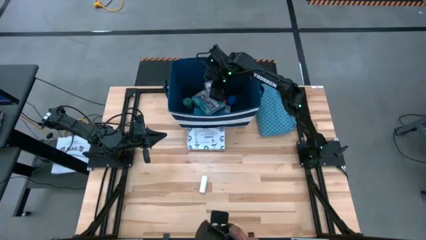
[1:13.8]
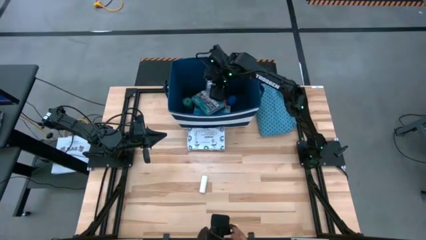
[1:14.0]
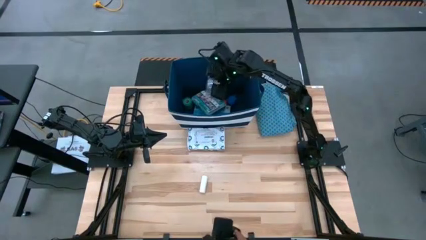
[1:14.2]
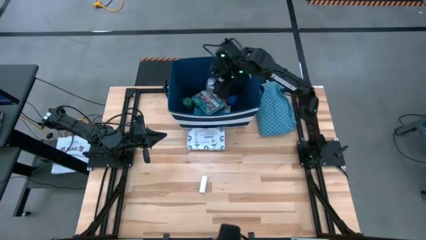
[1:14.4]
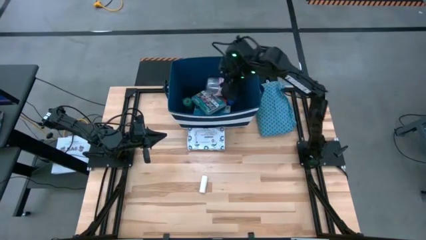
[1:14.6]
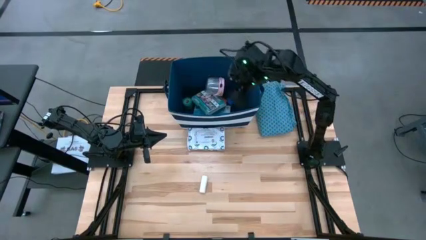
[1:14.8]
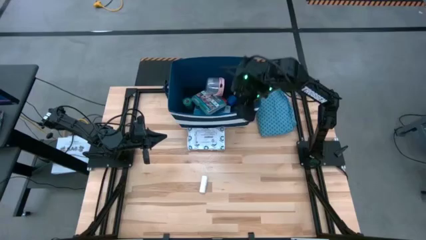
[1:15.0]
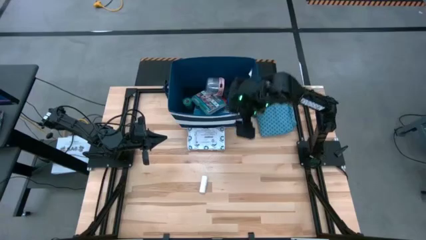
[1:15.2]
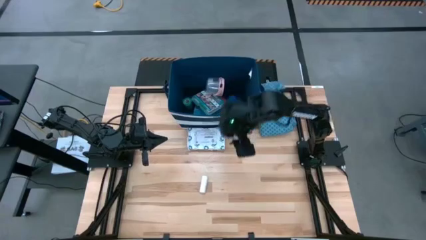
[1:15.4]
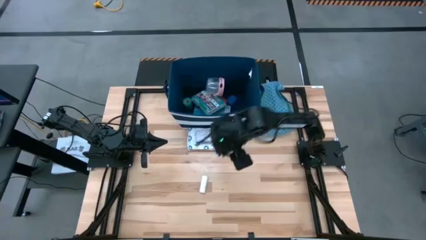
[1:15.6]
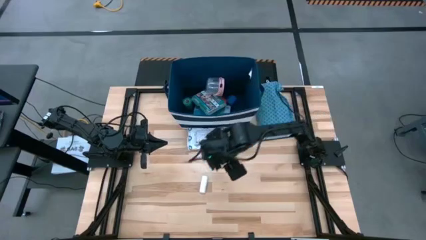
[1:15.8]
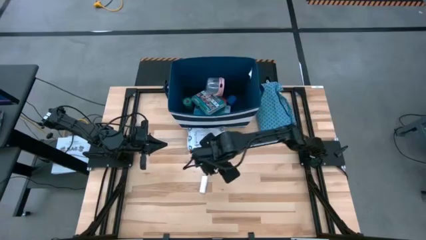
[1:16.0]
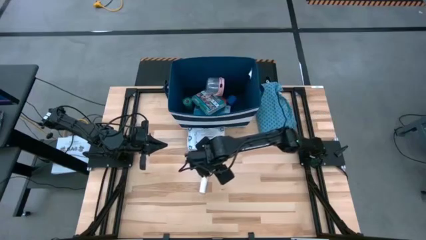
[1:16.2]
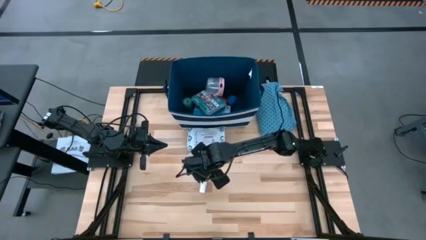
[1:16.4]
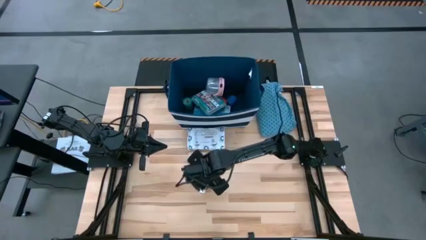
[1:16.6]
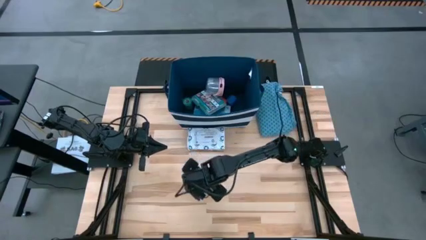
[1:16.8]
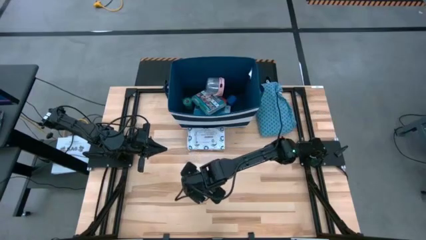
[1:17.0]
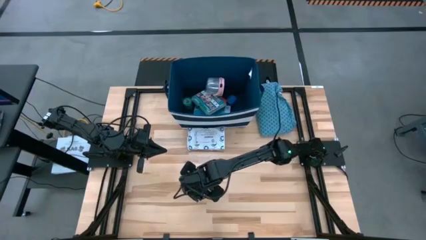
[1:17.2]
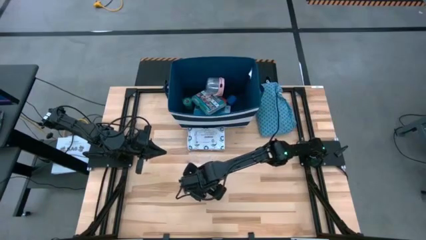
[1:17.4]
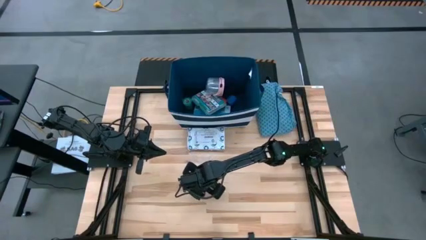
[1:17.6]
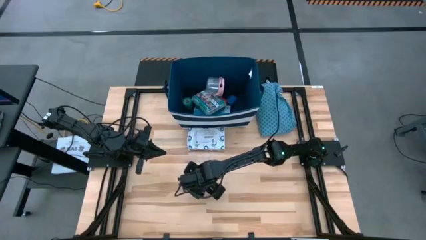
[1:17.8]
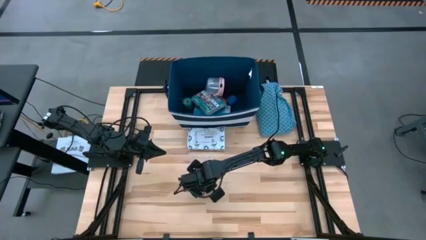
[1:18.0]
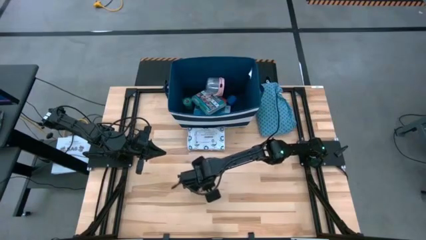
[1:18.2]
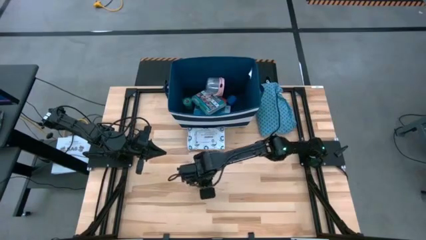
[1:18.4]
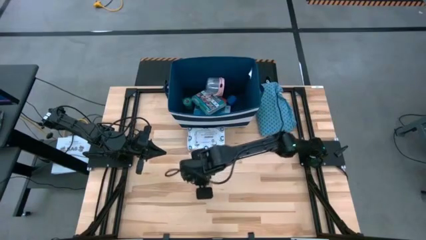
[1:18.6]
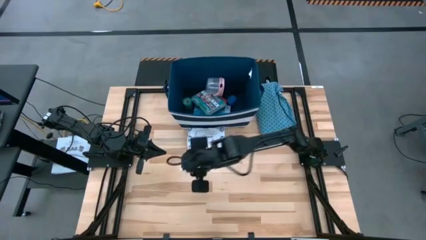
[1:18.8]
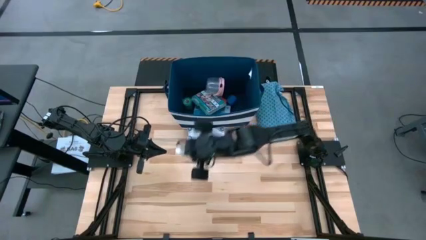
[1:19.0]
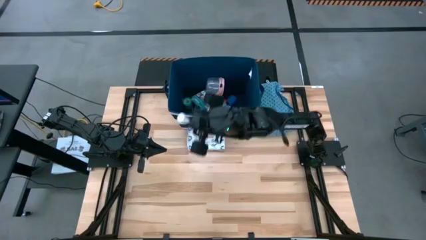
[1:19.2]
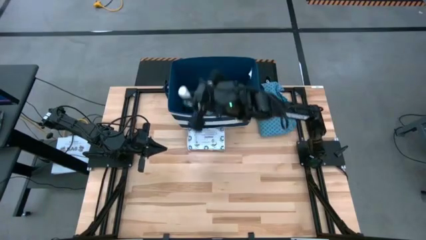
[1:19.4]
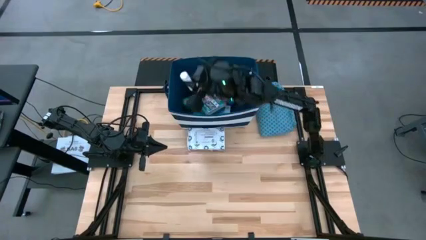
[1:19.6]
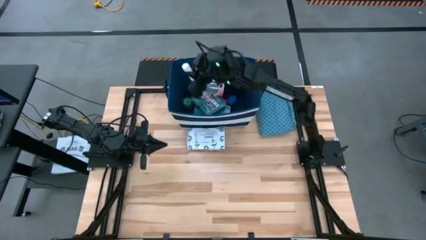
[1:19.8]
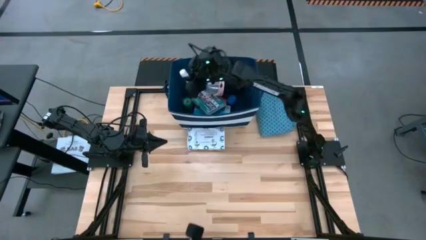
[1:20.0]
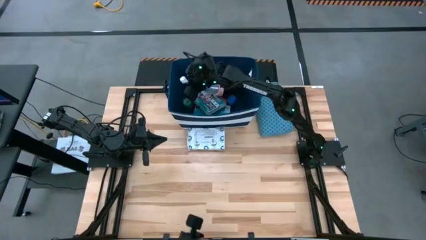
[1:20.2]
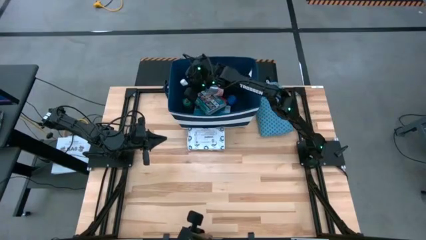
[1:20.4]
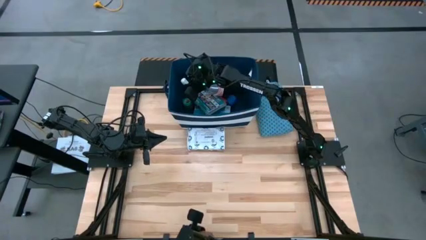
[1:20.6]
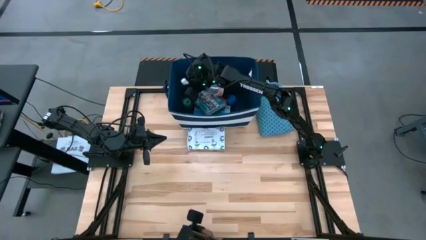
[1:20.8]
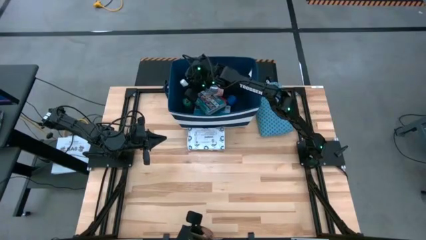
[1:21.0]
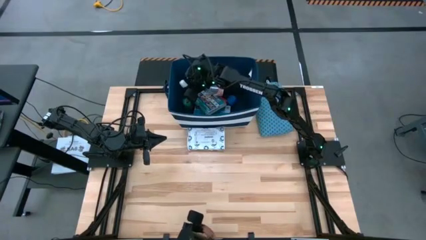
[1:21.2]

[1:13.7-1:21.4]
Task: Pick & place medical supplies in basket/bin
Put the white rolled gauze into the blue bin

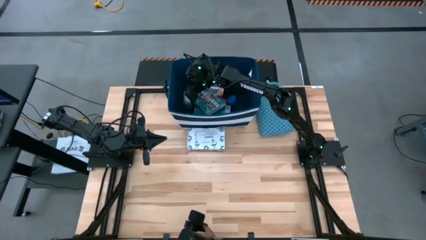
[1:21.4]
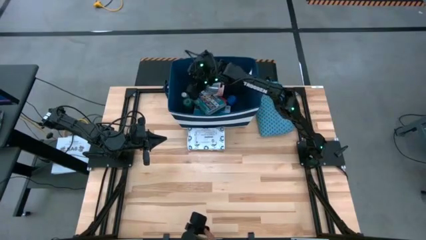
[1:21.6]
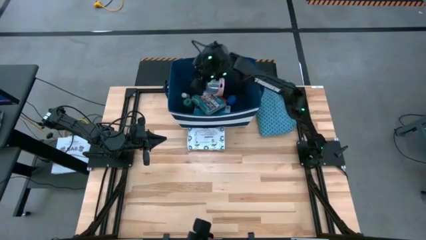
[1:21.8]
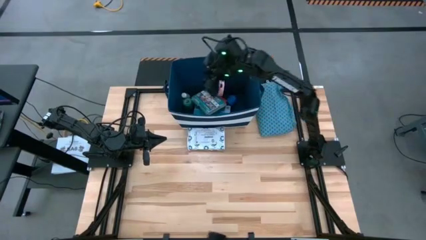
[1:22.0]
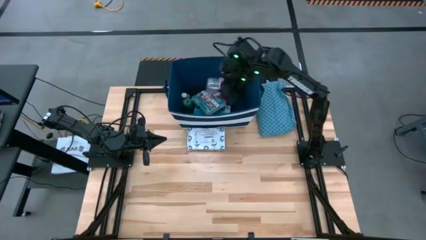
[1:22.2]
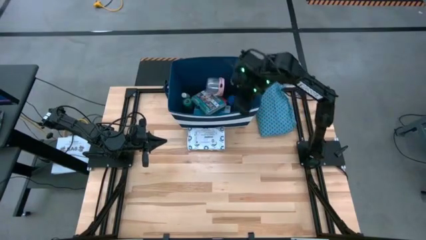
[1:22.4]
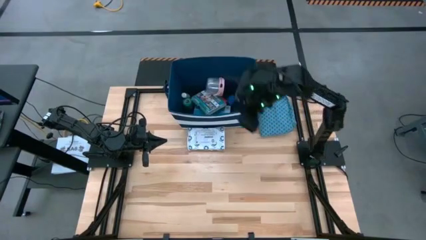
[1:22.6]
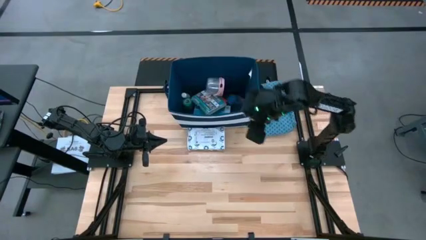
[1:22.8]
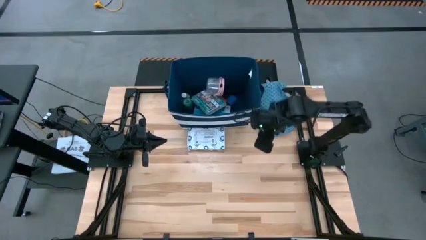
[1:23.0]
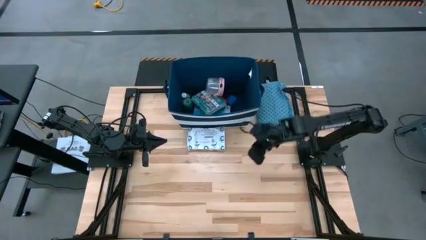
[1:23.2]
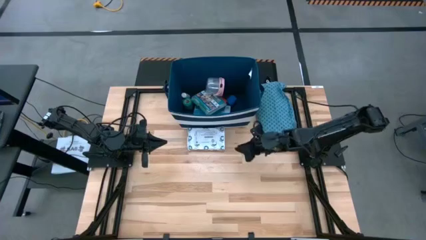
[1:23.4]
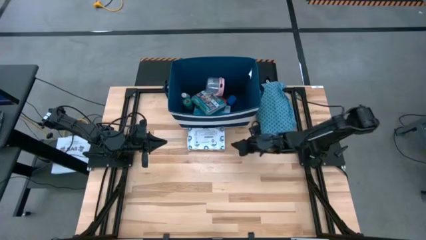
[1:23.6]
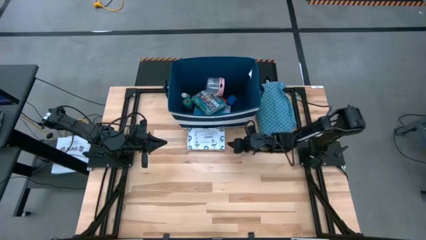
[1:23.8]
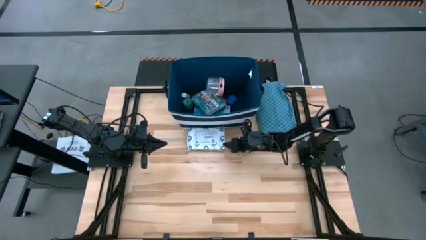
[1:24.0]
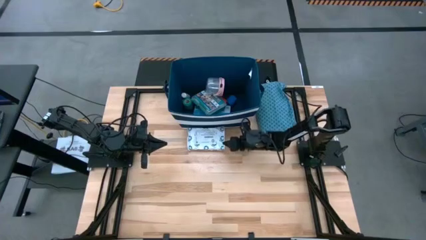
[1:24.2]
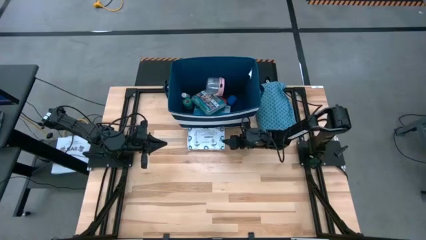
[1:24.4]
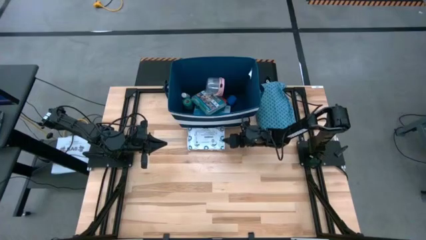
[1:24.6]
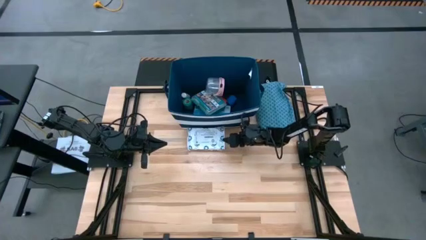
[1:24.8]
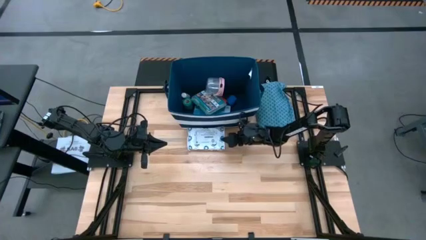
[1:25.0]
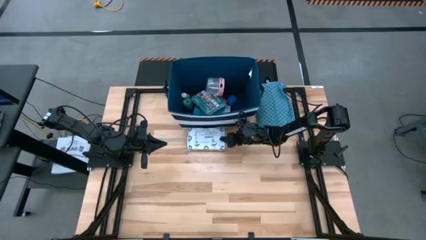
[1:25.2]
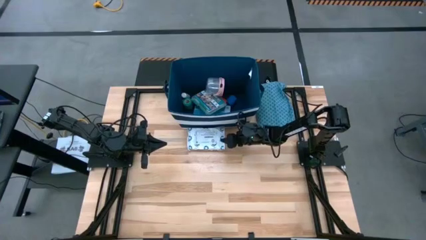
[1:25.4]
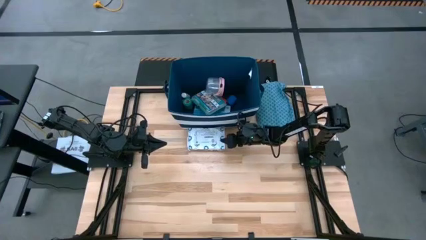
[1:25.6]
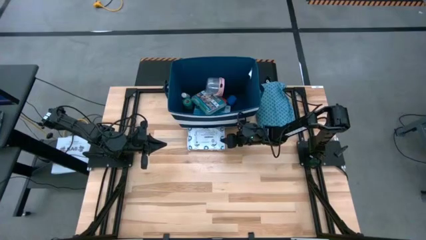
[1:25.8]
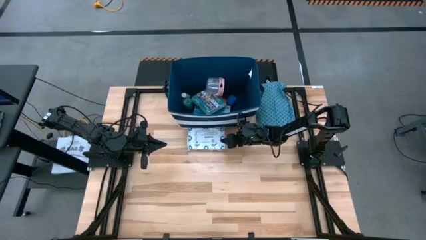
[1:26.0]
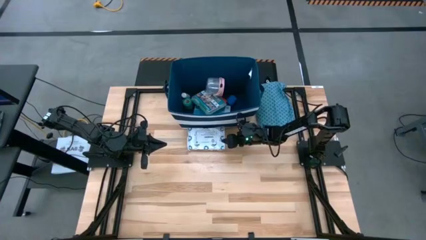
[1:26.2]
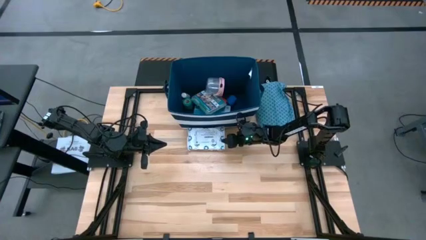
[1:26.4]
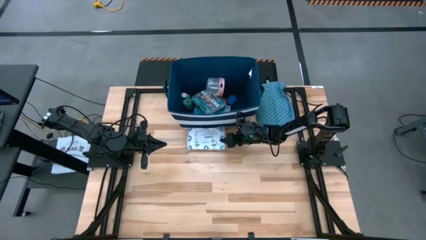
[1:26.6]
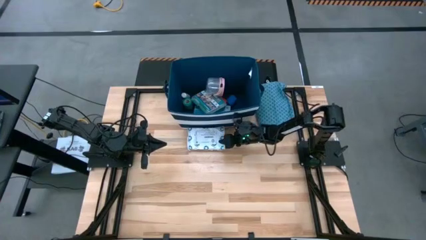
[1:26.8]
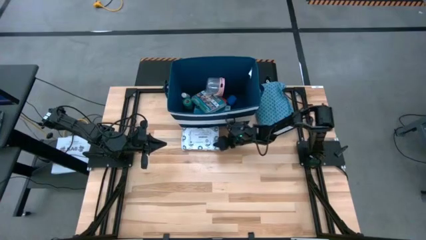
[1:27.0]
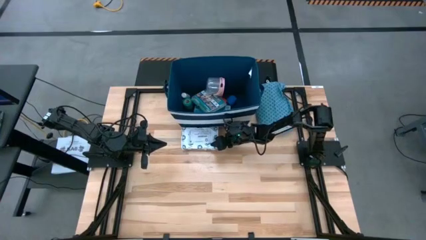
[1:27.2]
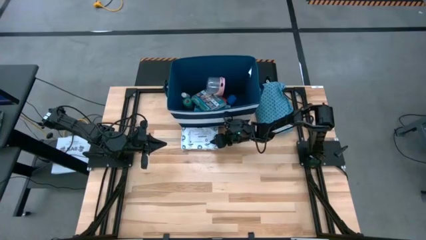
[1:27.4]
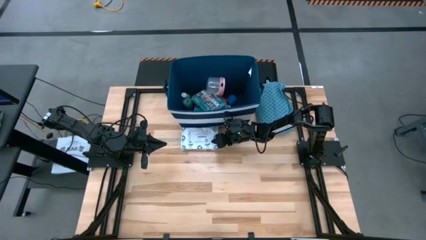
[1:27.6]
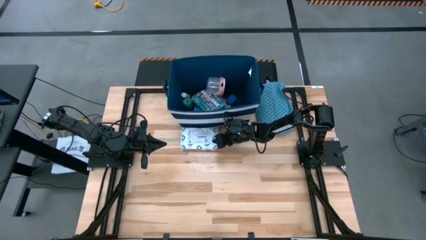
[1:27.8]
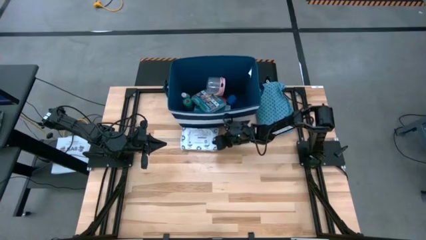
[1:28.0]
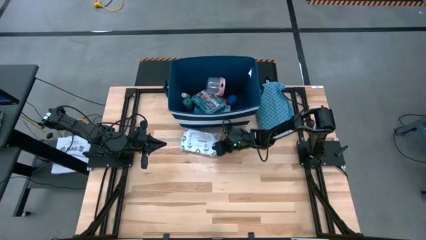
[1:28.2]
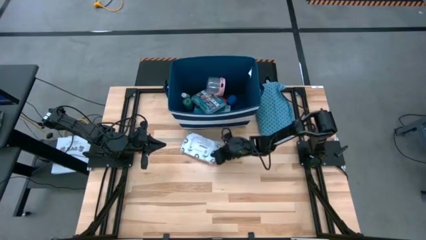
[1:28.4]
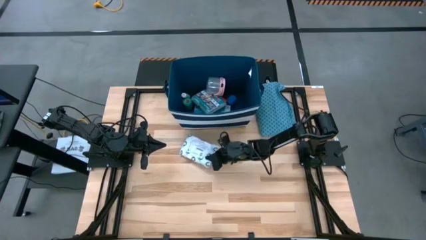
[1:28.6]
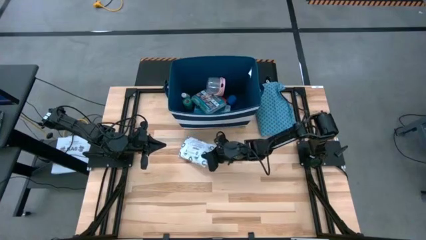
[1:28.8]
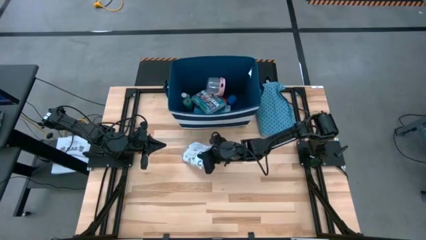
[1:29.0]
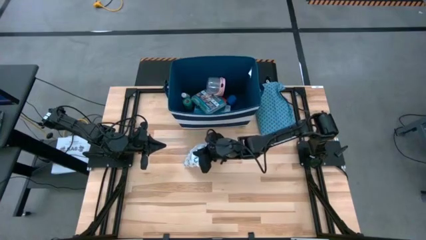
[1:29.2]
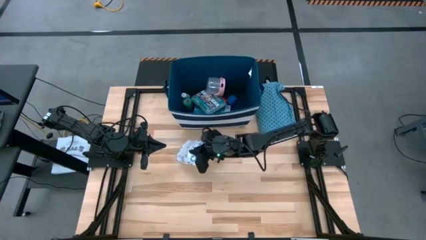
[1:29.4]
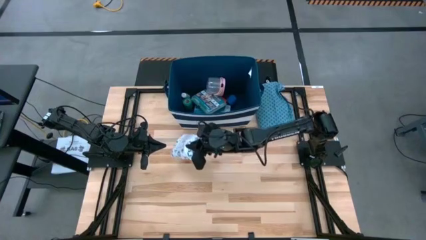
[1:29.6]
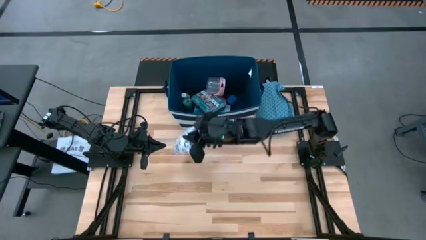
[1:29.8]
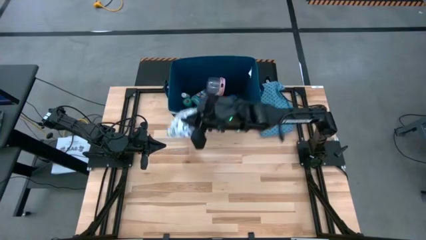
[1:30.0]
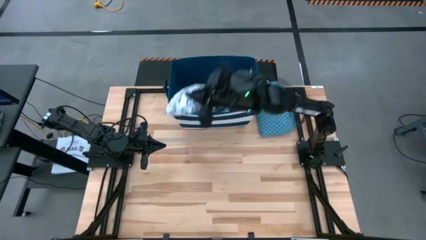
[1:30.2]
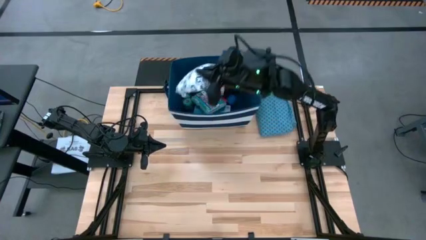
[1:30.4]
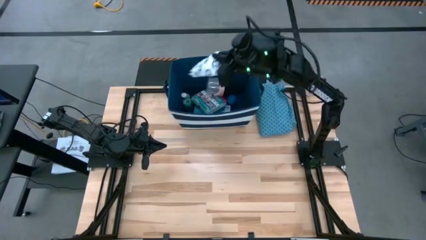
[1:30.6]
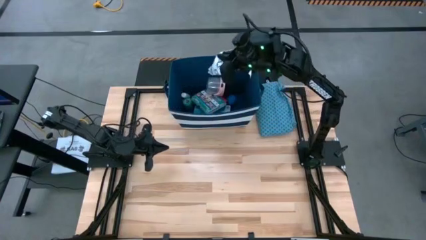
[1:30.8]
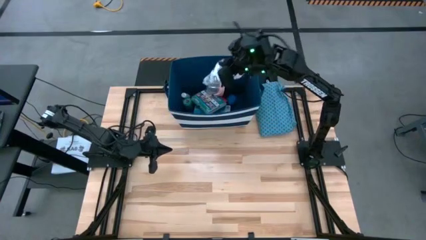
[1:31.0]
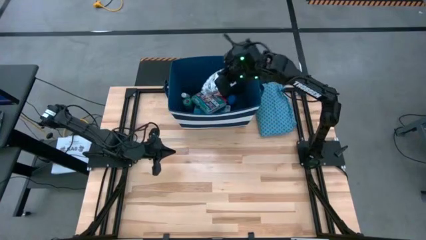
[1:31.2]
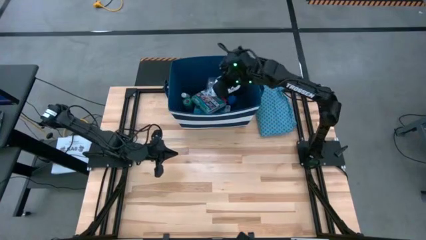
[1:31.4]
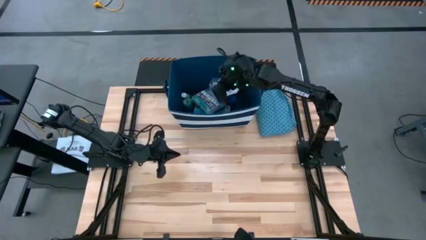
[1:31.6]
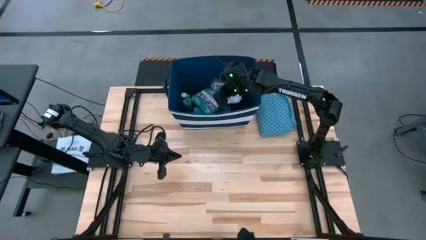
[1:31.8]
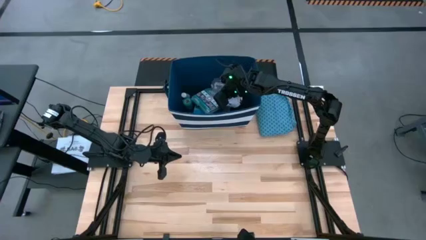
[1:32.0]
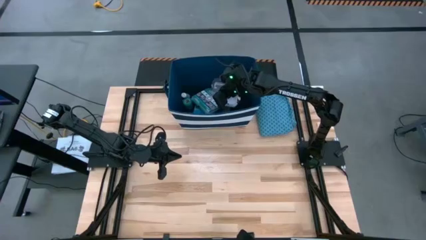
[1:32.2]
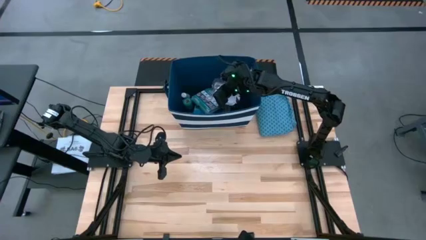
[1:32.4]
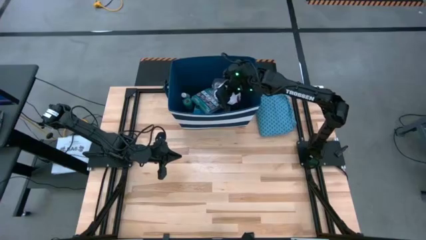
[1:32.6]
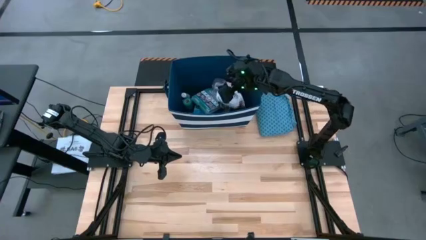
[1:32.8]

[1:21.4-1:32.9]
Put the white mailer bag into the blue bin
